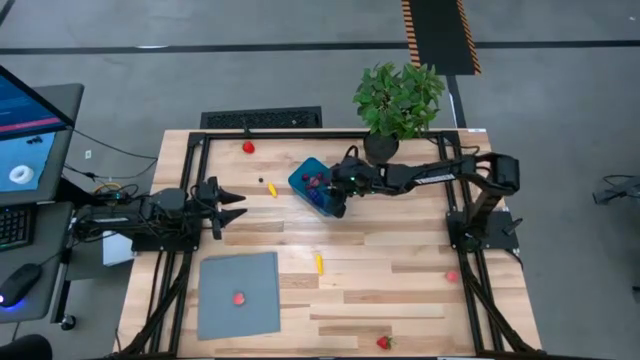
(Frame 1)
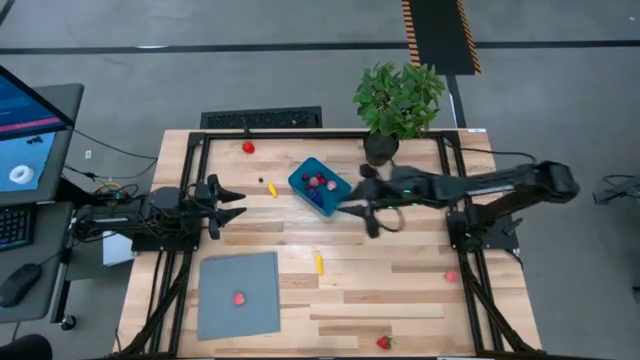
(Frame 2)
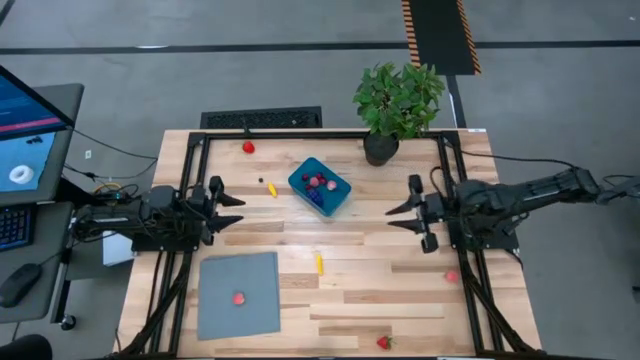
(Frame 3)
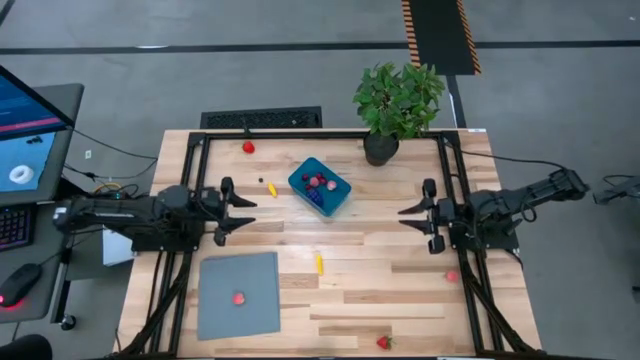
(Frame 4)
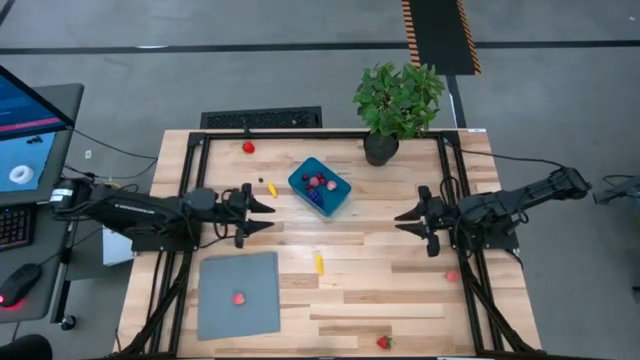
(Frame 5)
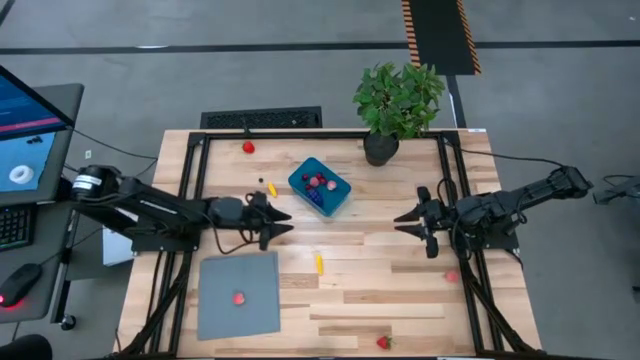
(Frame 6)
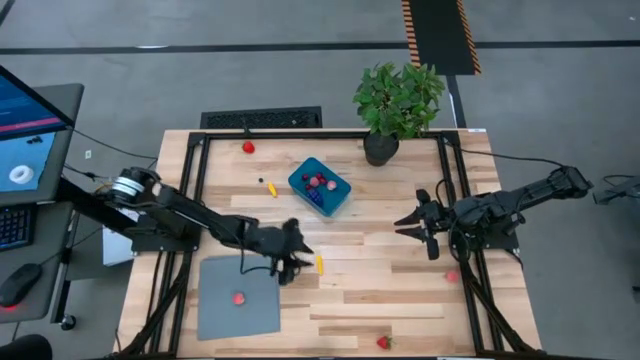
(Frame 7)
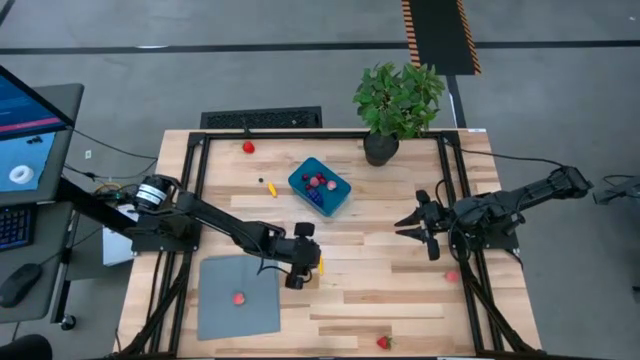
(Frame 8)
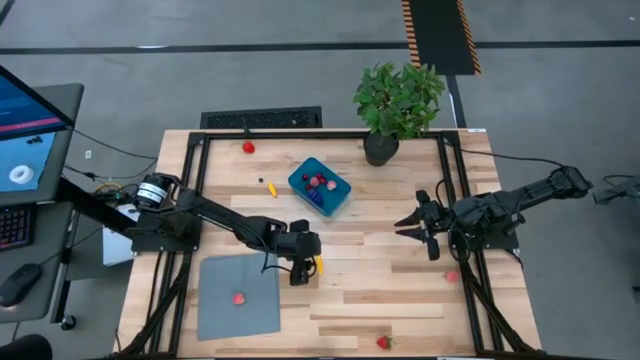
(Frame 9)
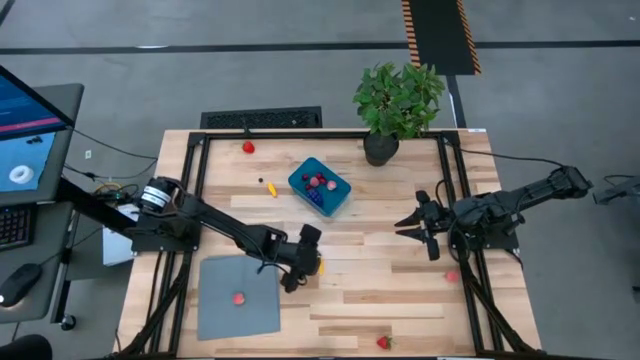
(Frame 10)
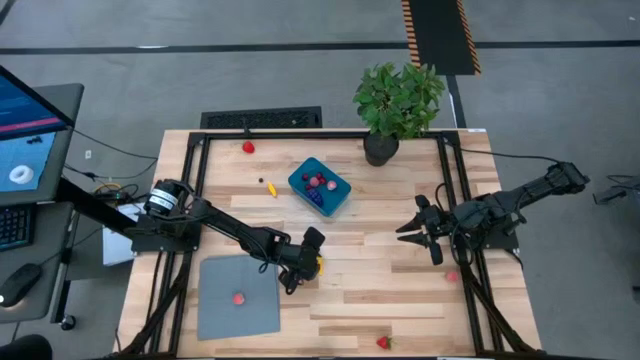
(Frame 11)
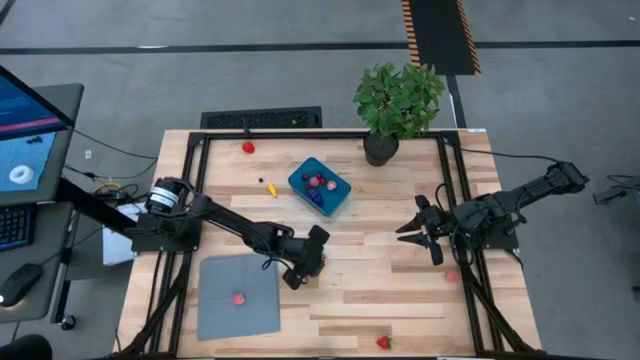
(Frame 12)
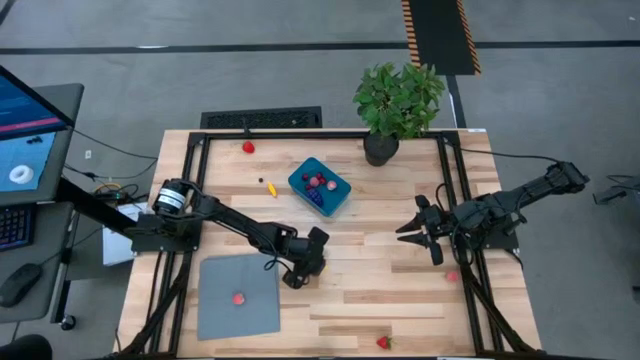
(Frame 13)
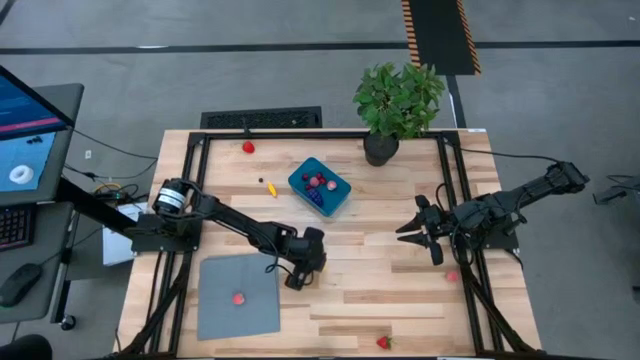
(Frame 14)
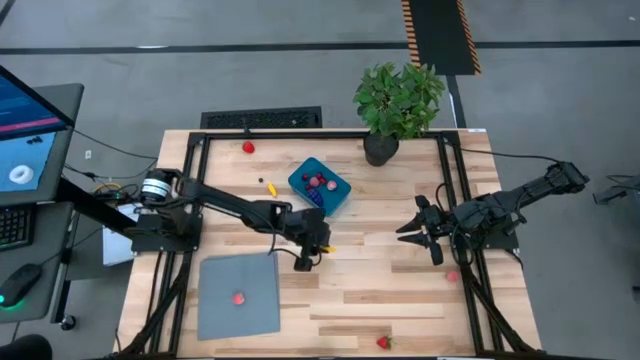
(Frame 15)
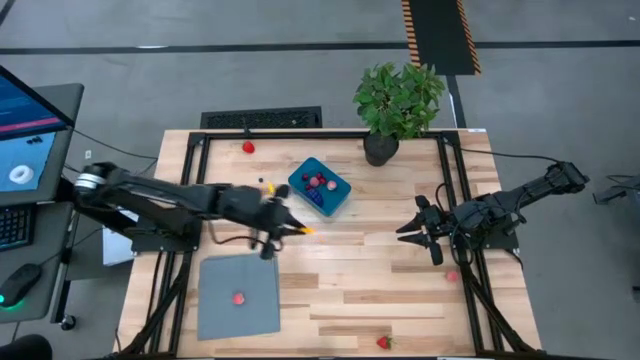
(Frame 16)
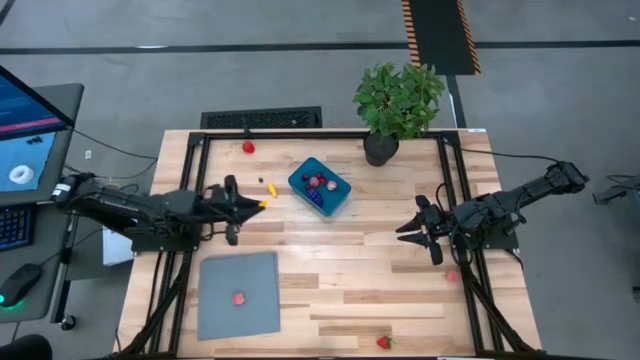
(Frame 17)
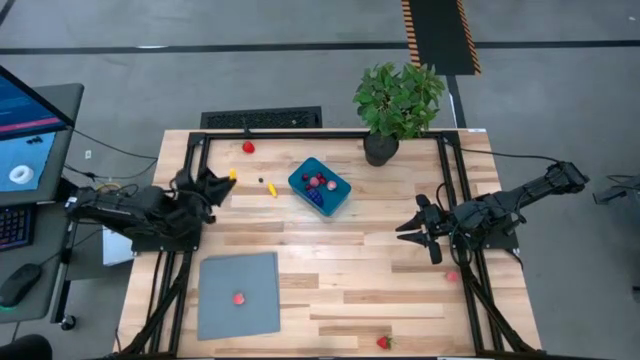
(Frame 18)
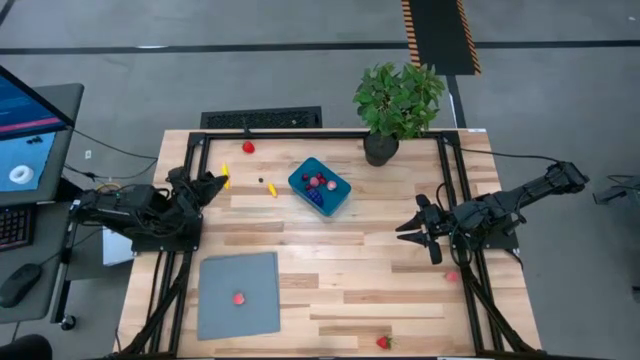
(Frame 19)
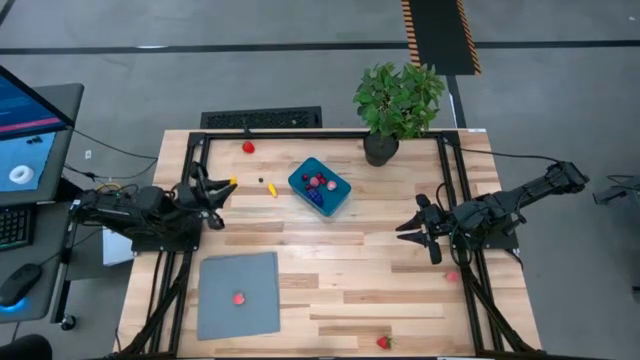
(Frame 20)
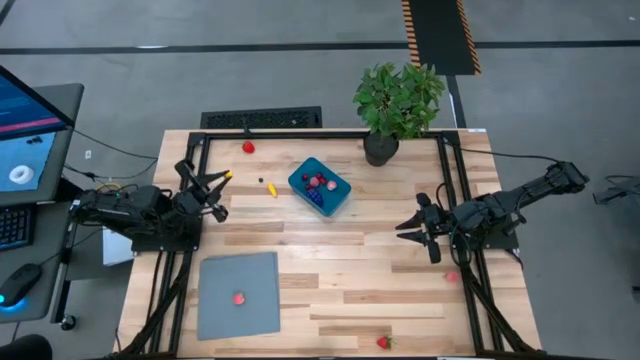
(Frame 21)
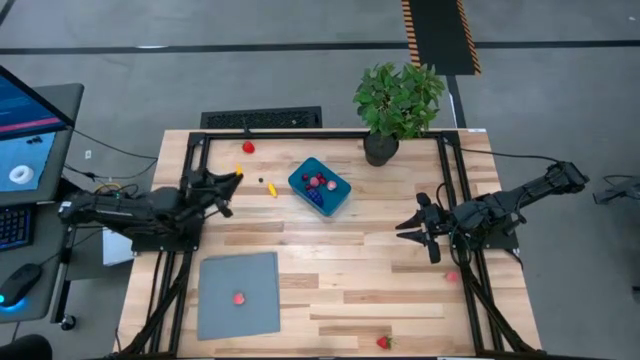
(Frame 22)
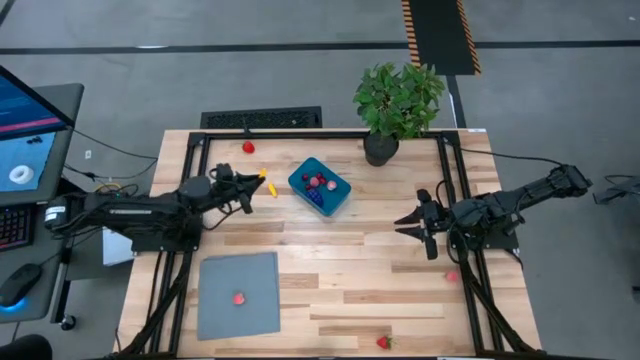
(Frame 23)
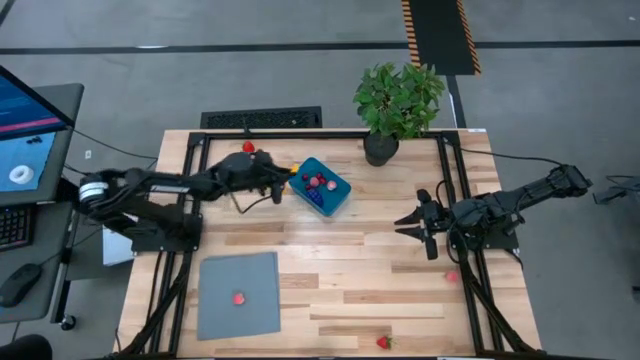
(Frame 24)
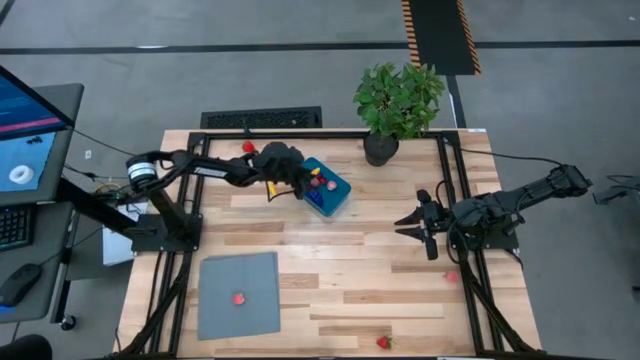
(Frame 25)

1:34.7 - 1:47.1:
Task: Pick and placing Produce into tupperware
Put the bottom corn into the container

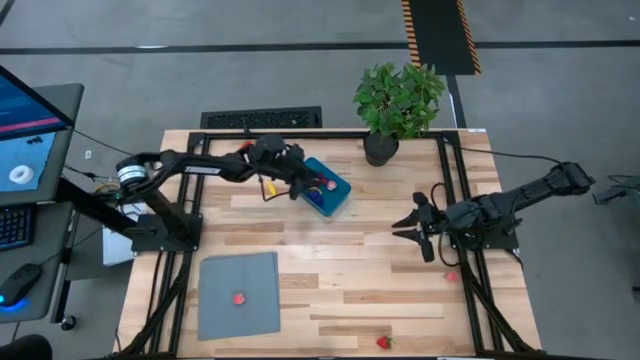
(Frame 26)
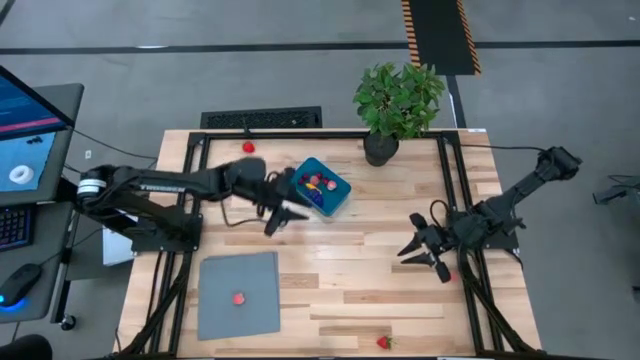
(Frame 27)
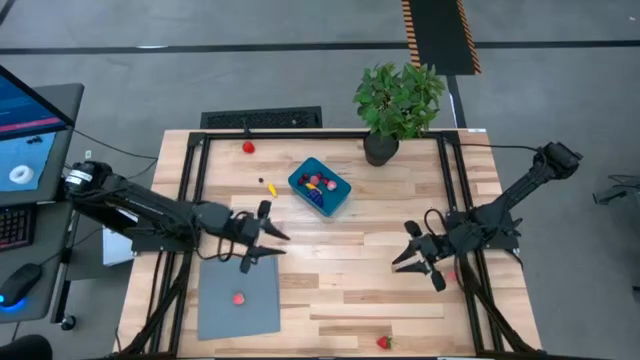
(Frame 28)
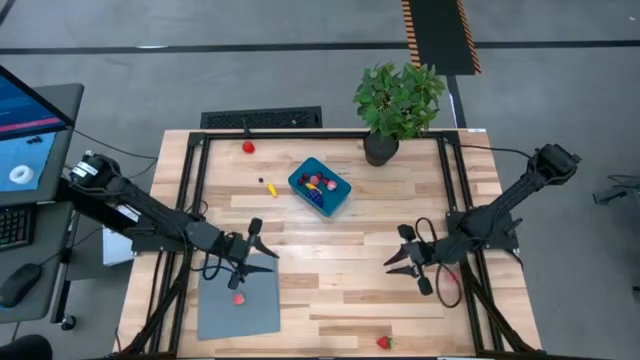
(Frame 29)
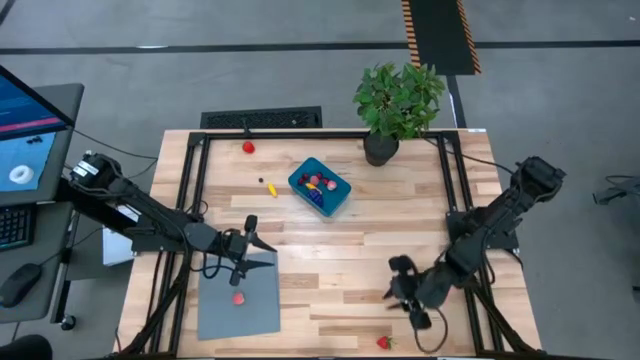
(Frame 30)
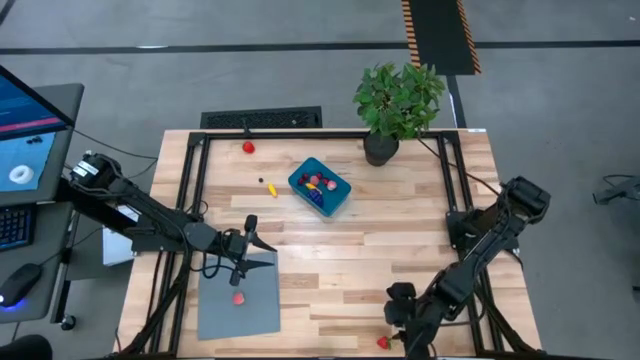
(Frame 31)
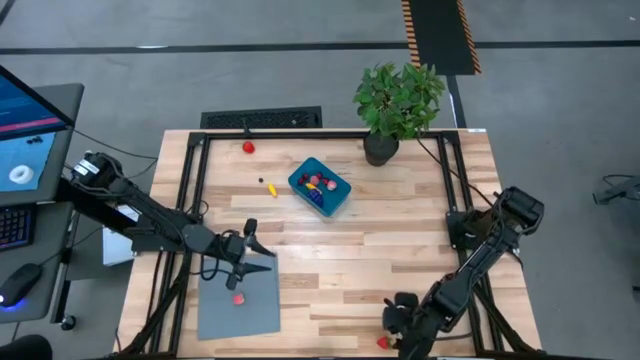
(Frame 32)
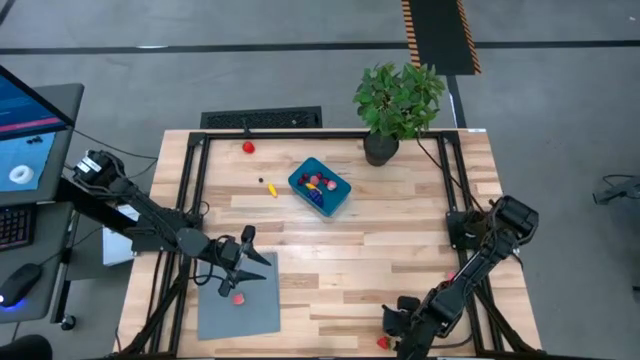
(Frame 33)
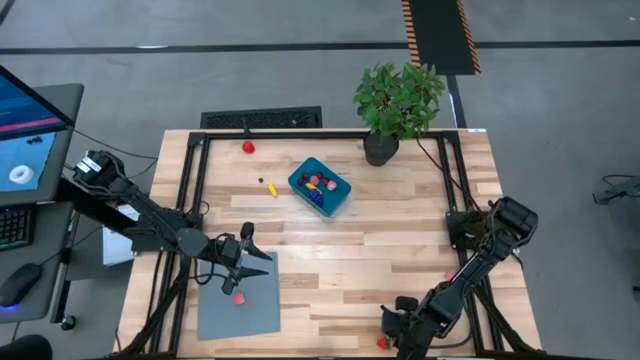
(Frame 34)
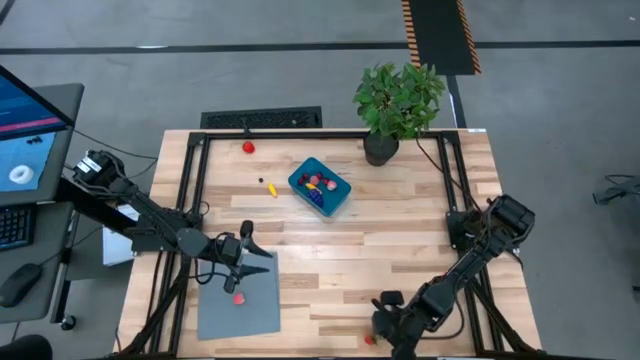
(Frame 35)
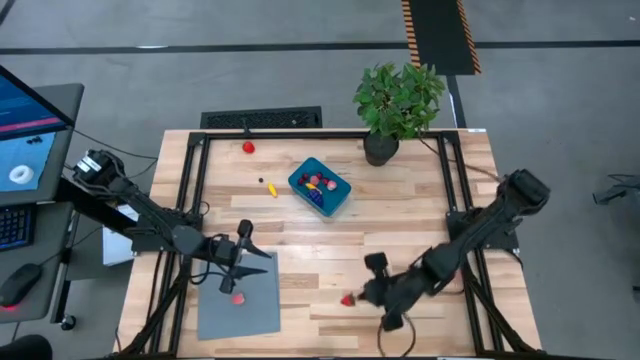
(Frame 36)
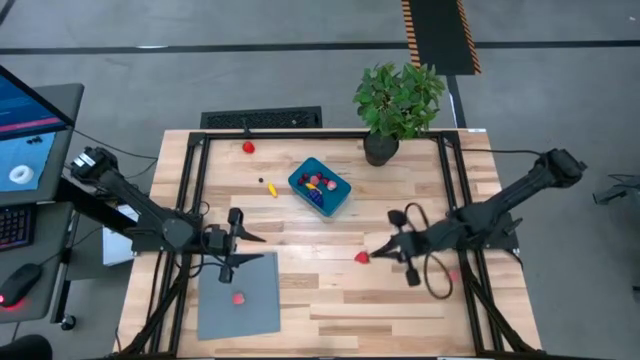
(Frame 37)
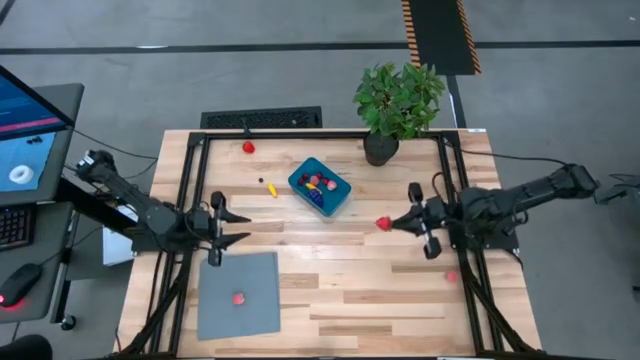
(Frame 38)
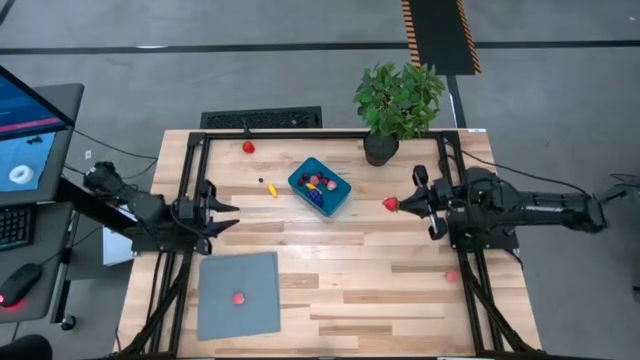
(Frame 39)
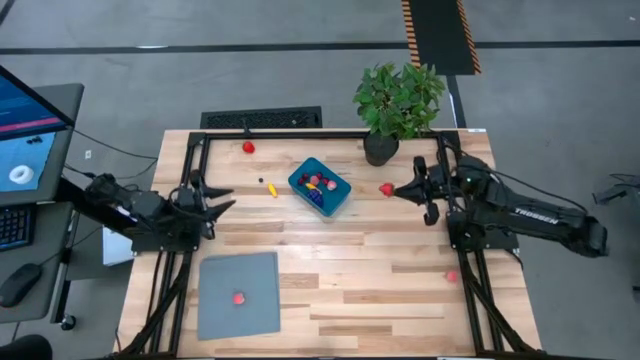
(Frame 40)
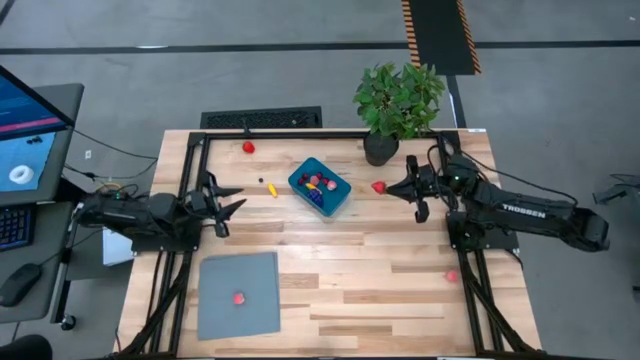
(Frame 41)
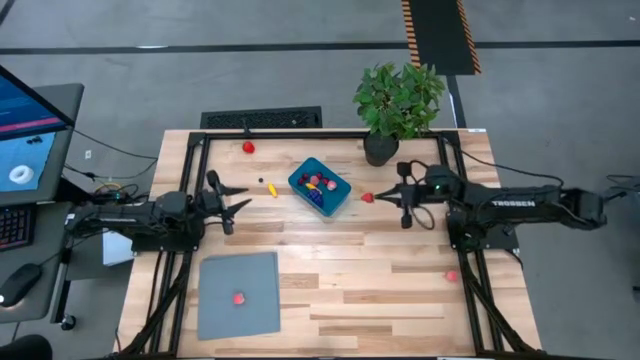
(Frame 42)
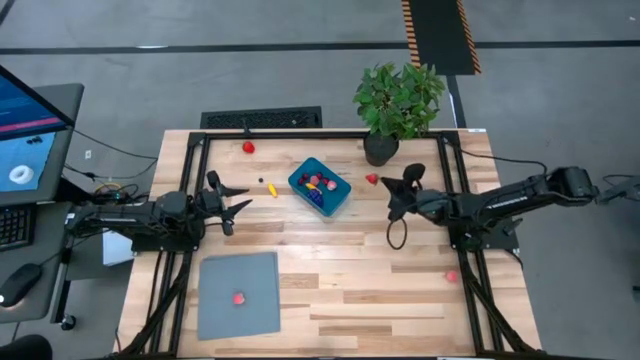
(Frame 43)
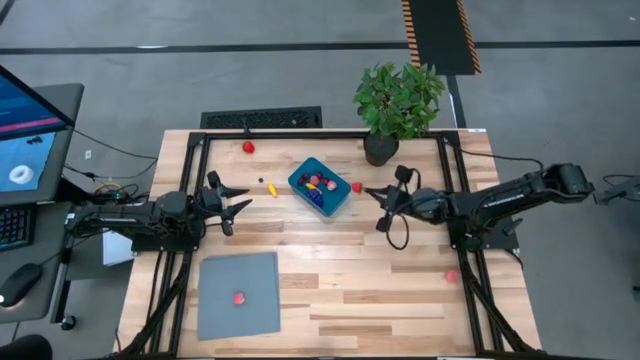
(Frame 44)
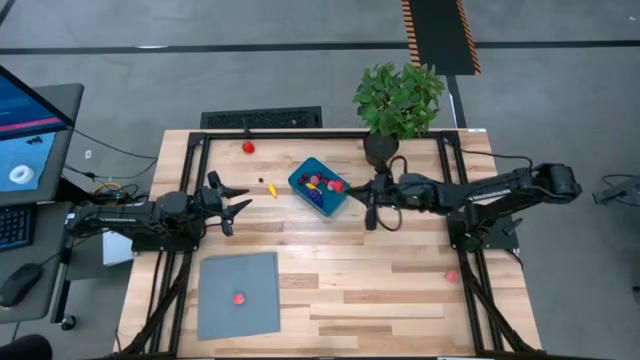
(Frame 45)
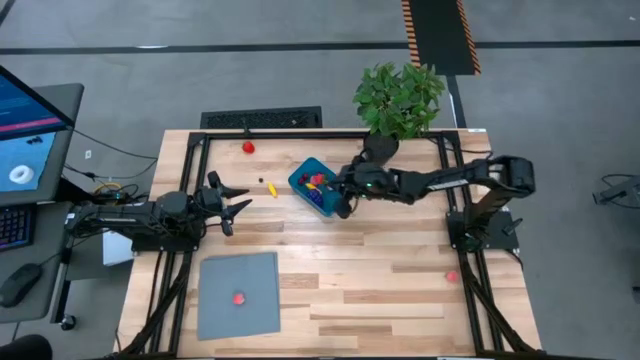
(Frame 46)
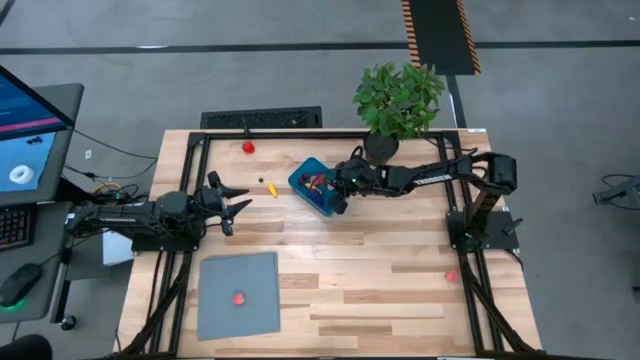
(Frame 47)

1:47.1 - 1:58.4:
Put the bottom strawberry into the container
